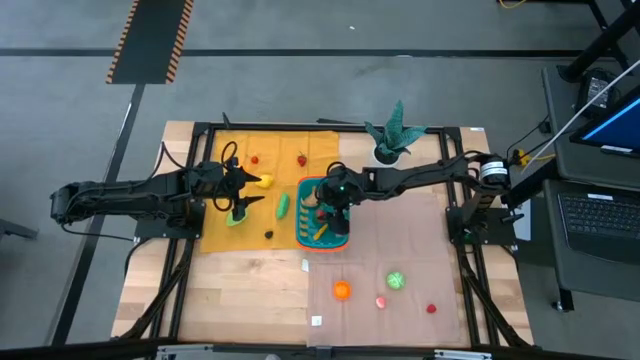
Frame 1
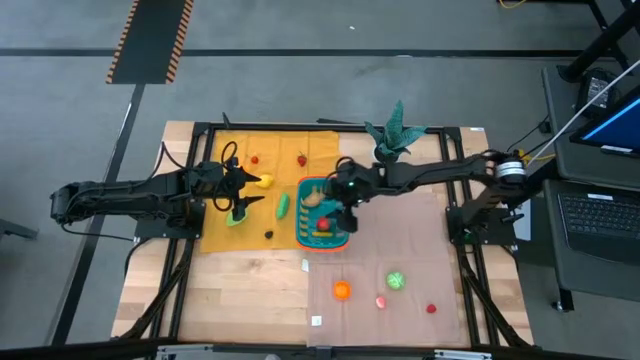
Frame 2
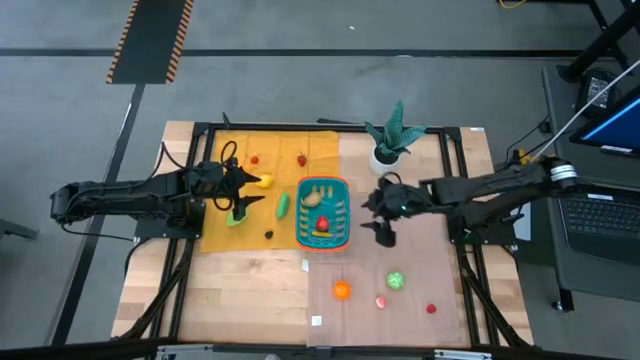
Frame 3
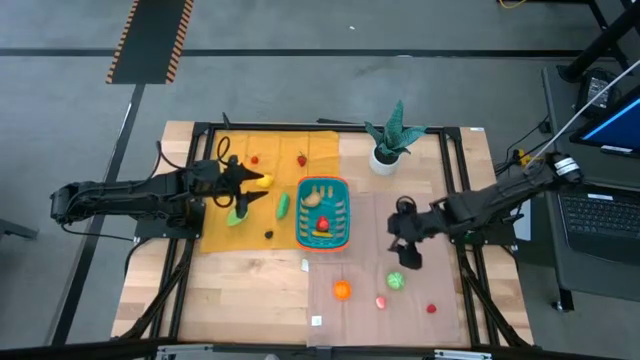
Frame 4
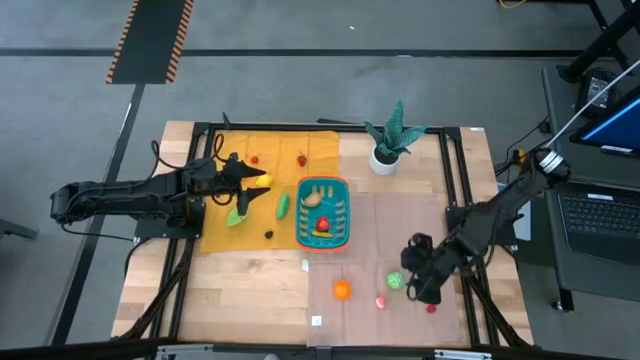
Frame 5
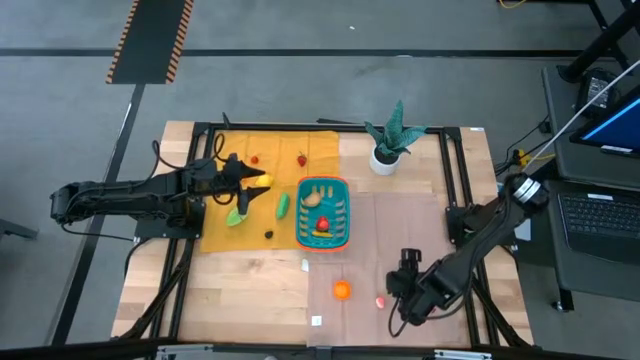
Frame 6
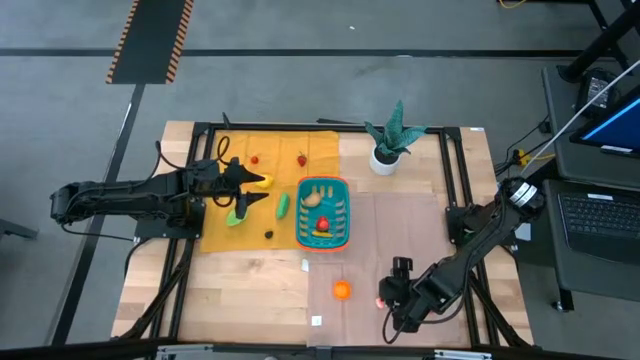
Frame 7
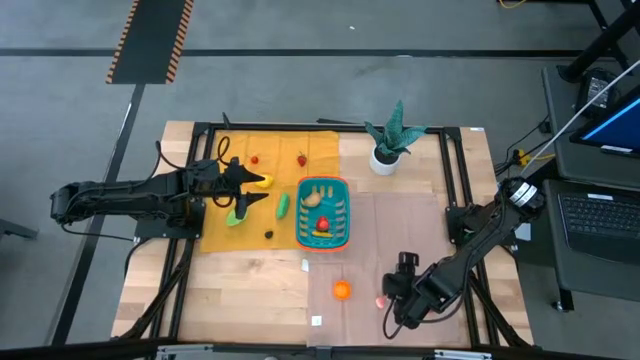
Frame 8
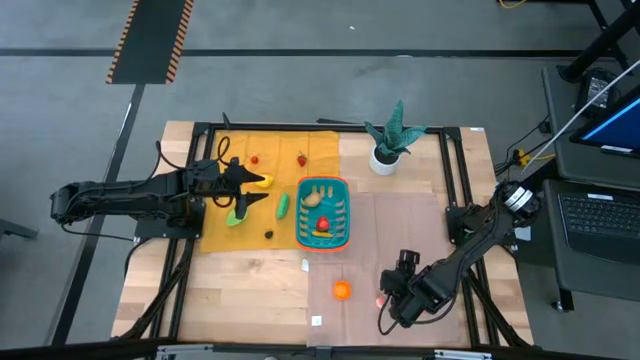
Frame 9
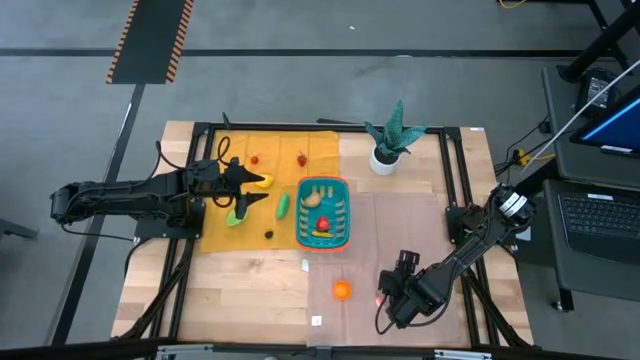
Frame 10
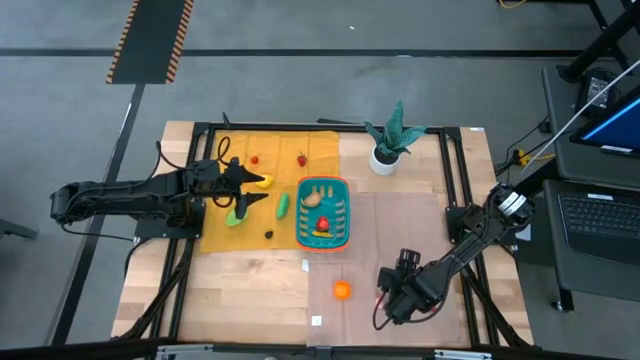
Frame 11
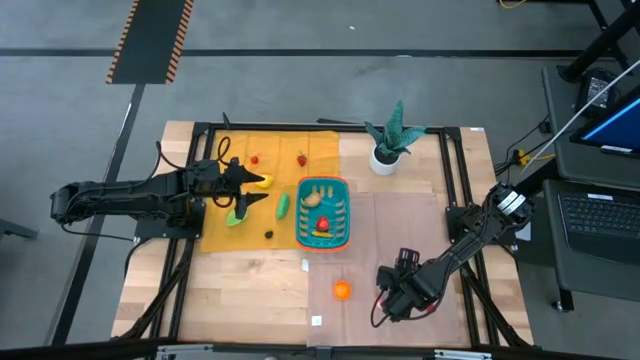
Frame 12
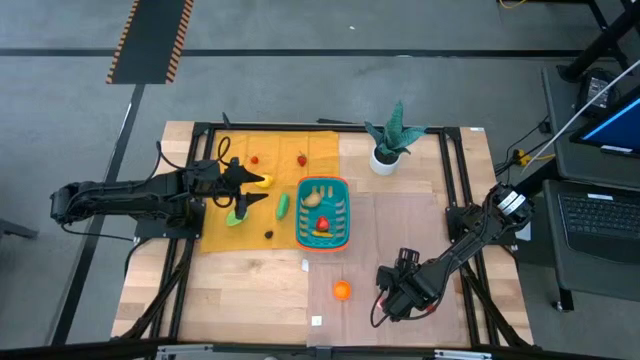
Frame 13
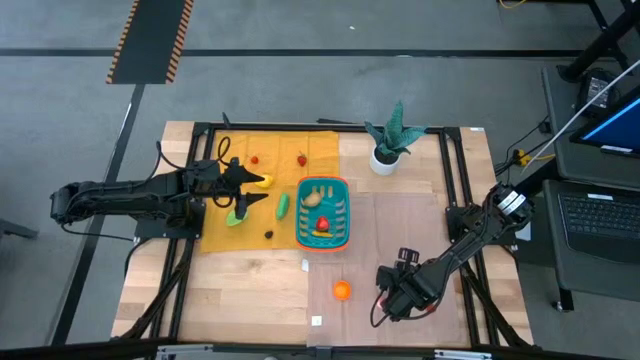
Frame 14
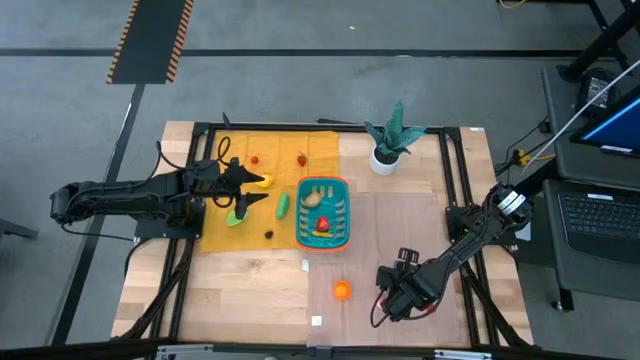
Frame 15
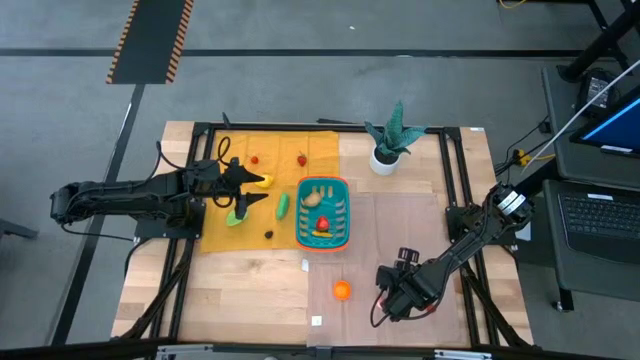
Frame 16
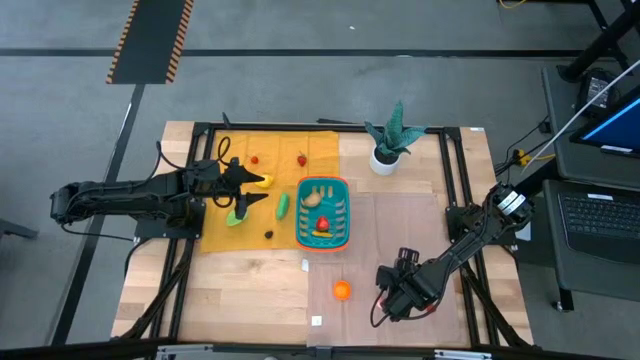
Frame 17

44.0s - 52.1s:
Task: Pick and placing Produce into tupperware
Put the cabbage into the basket

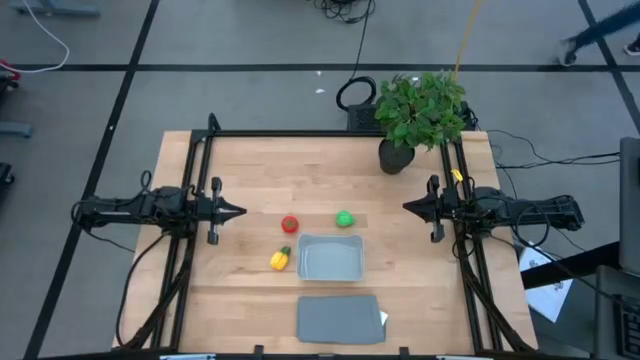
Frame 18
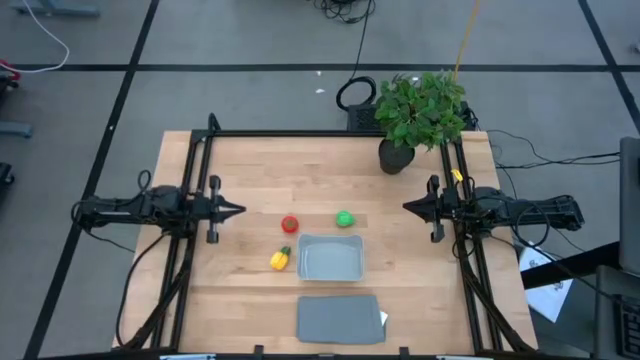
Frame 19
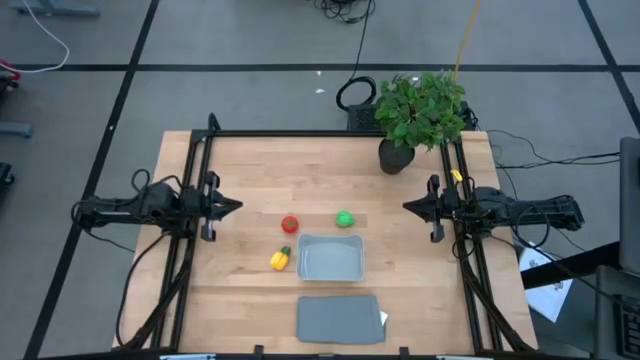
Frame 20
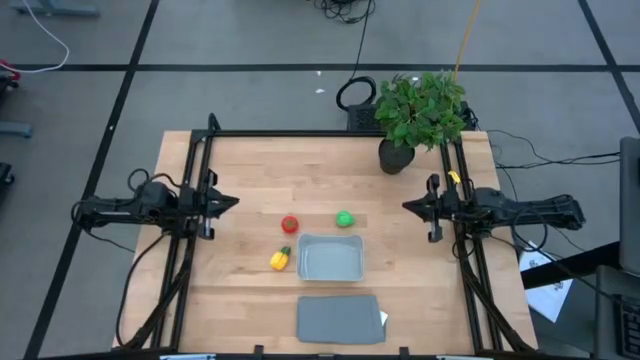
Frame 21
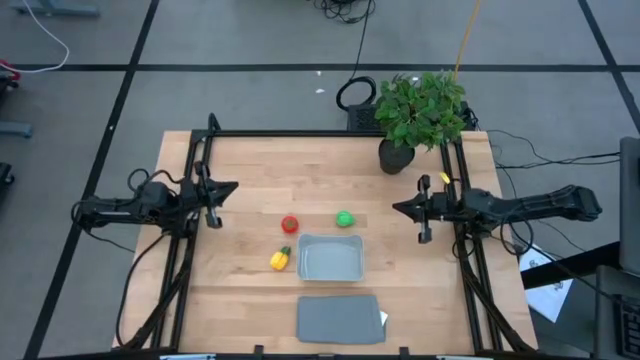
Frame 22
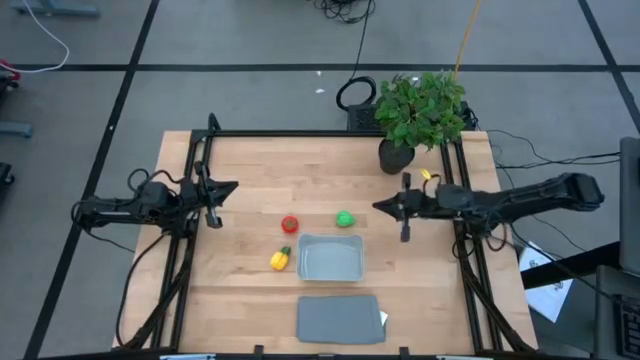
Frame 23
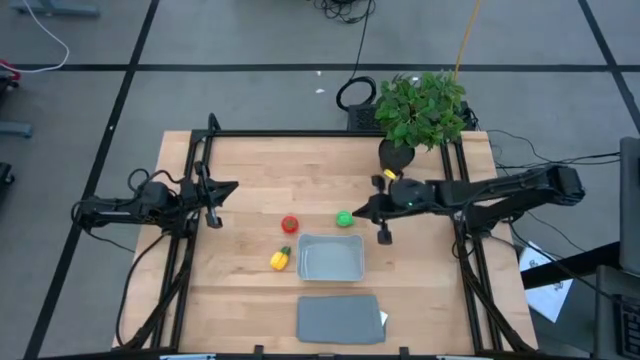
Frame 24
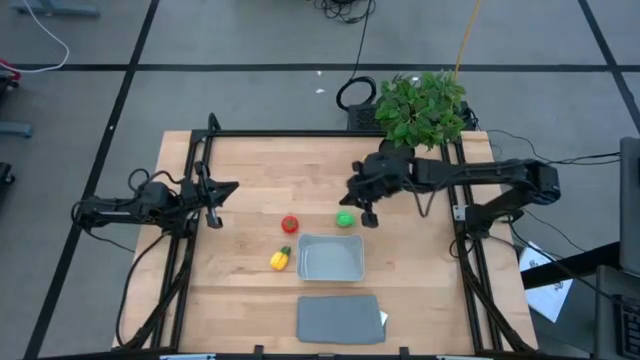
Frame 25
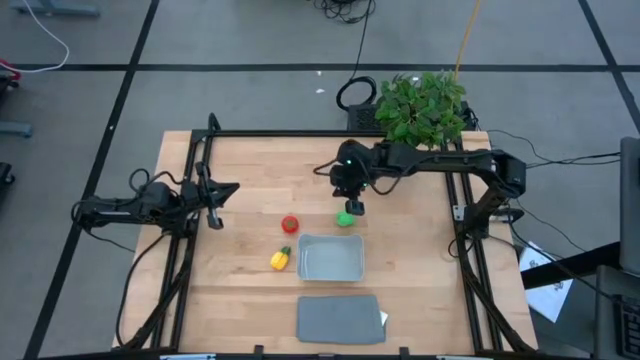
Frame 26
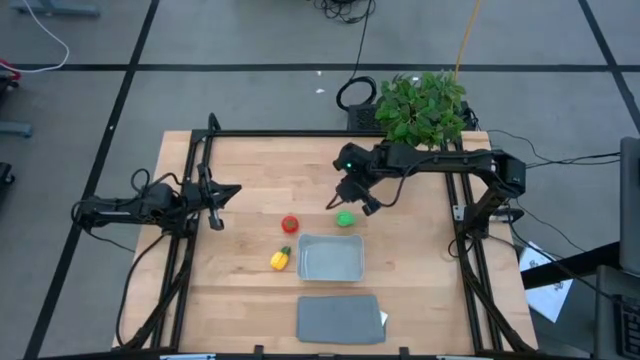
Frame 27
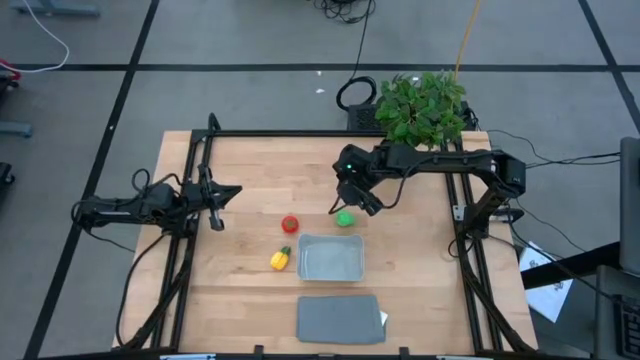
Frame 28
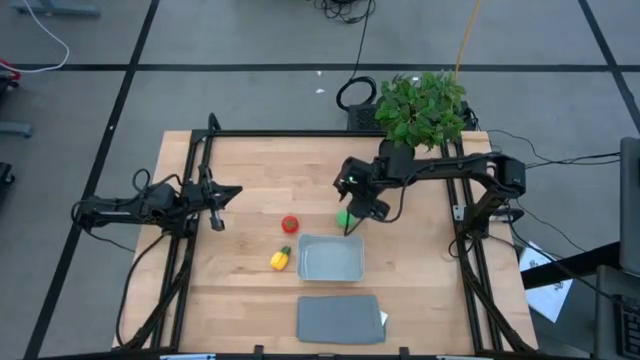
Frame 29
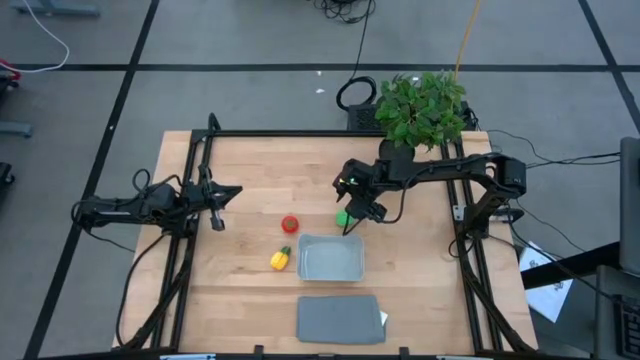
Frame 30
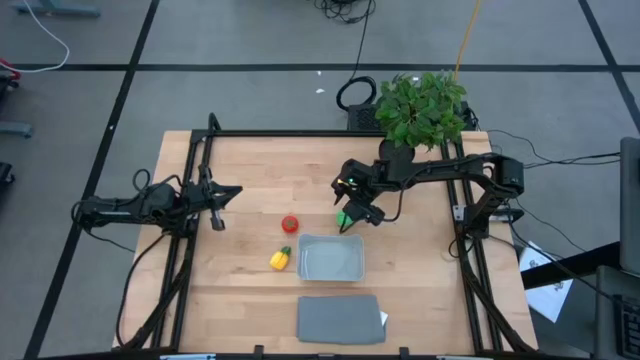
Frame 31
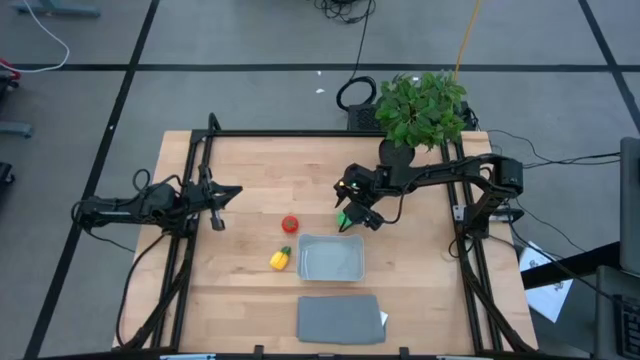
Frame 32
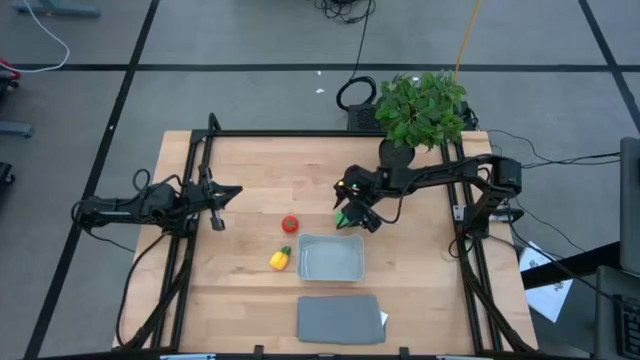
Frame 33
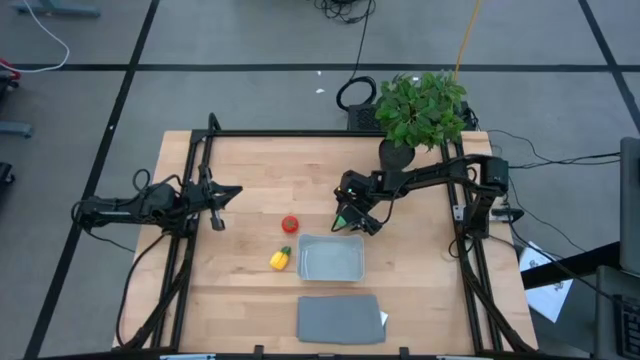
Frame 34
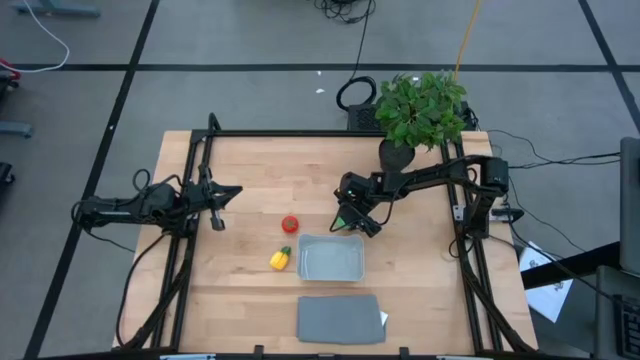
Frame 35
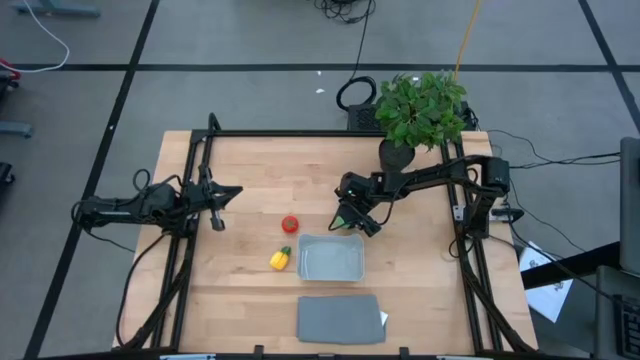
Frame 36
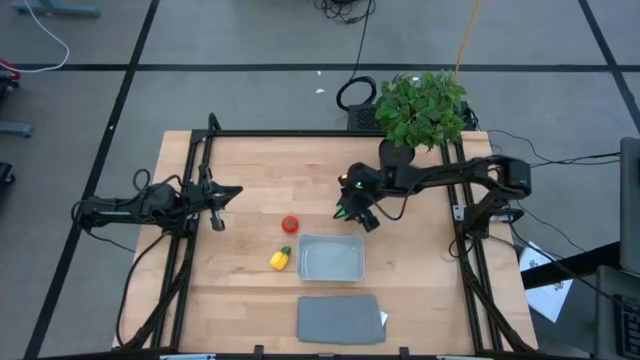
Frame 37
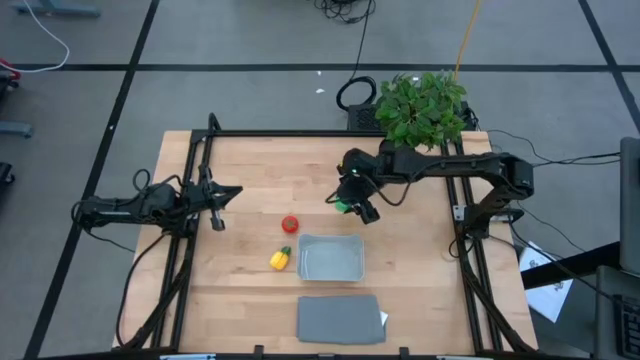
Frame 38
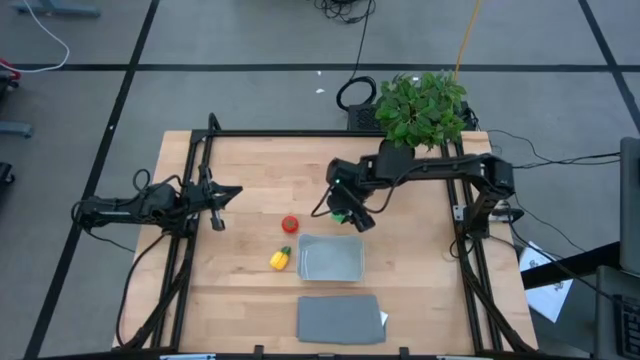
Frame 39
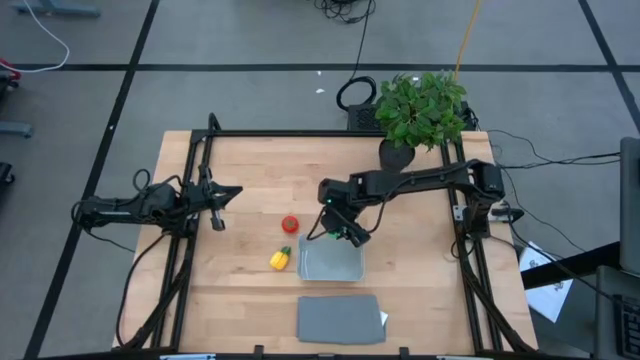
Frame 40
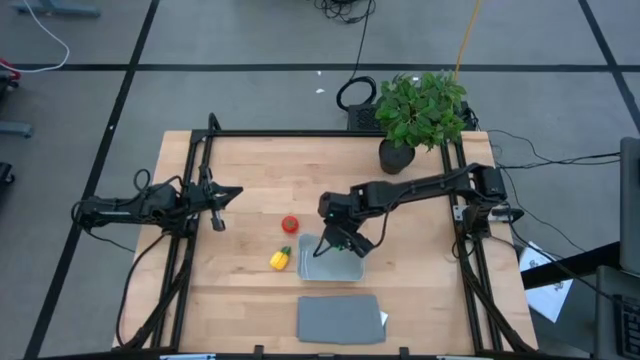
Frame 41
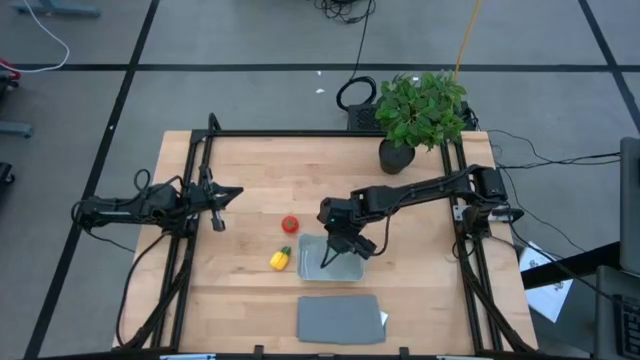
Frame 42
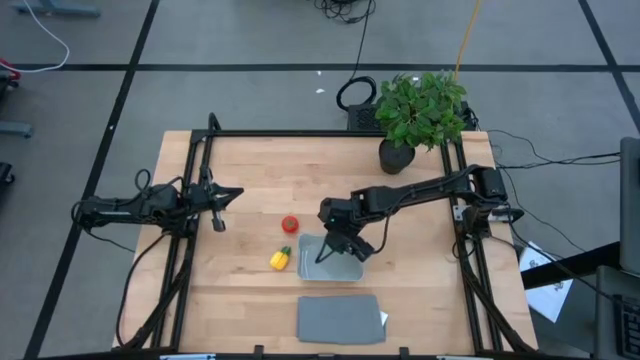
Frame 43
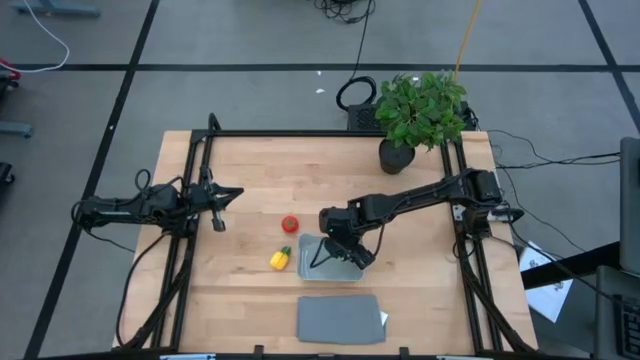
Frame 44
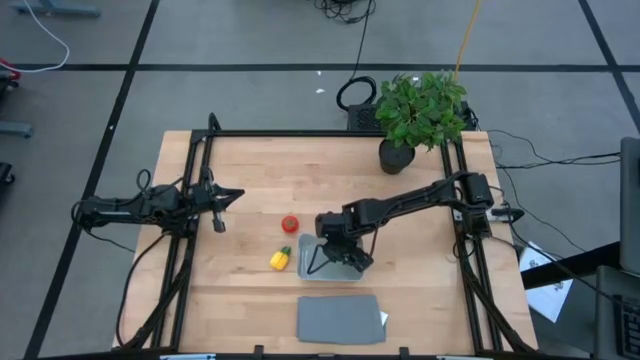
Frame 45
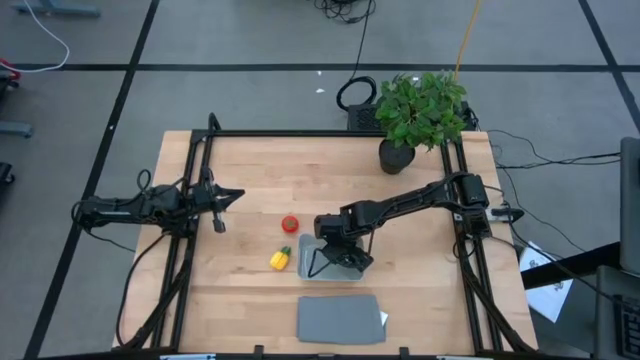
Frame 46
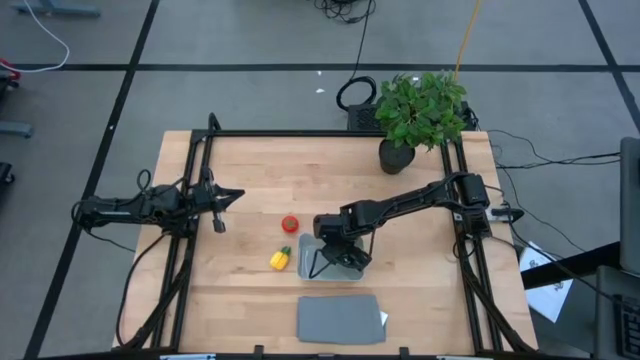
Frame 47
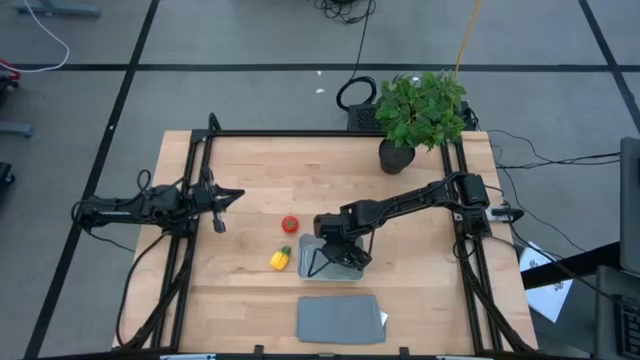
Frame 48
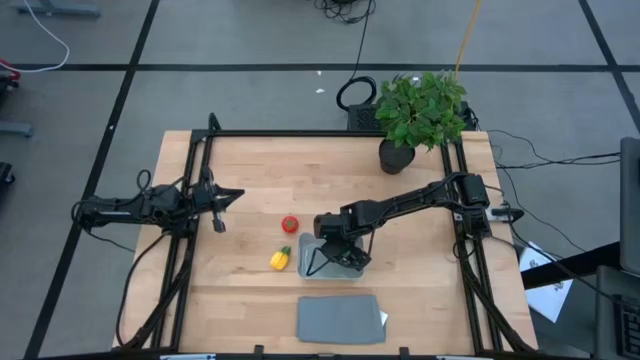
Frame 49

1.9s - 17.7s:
Task: Pick and placing Produce into tupperware
Put the avocado into the bin
